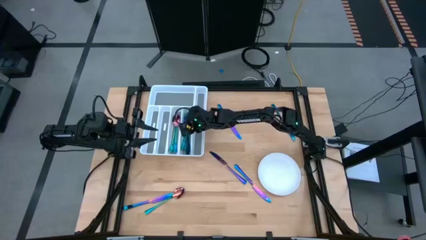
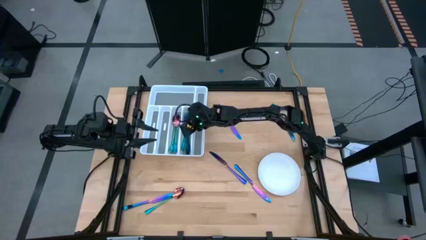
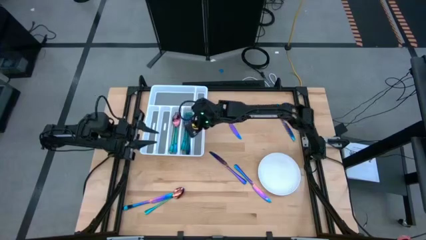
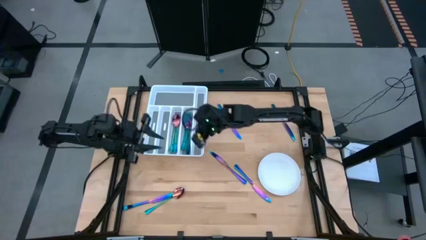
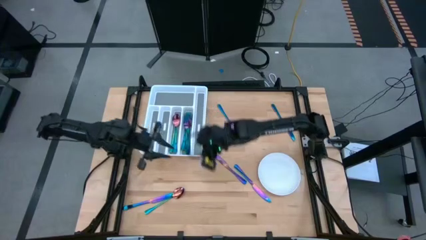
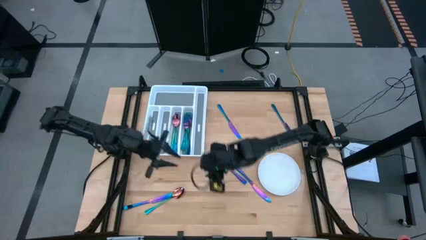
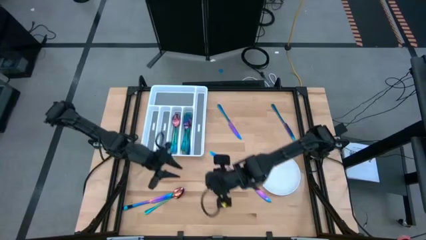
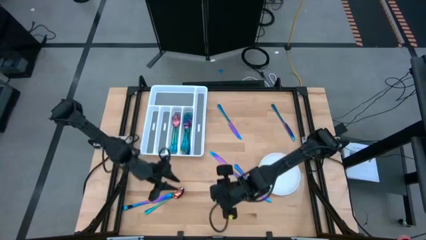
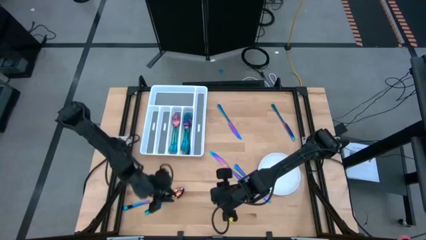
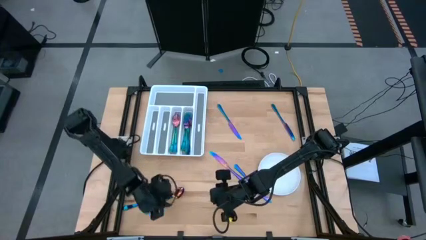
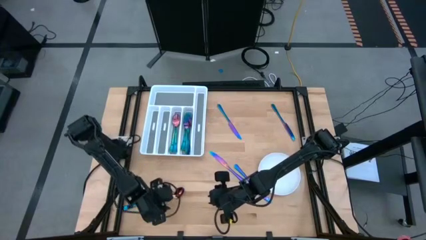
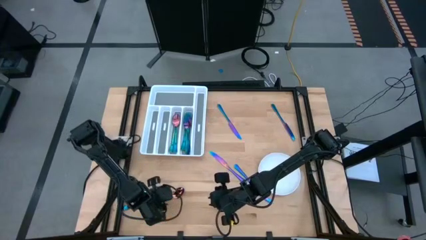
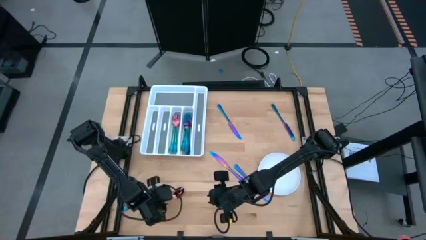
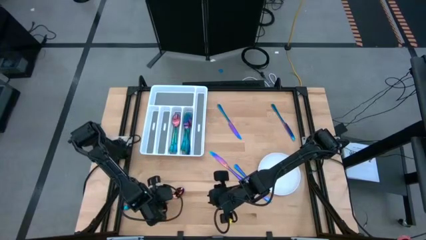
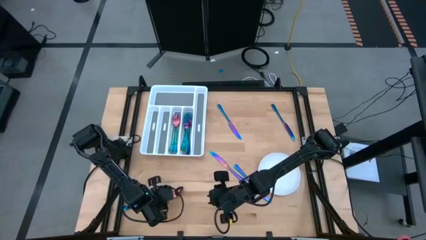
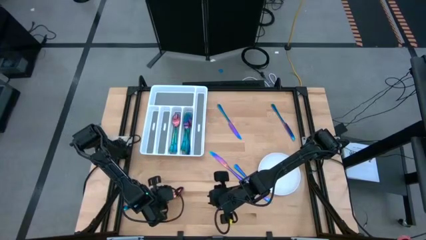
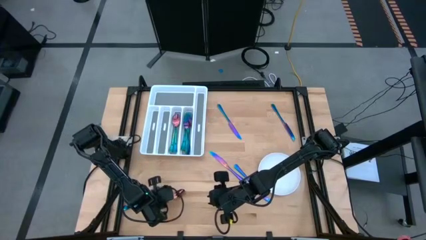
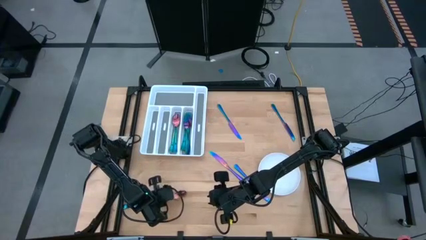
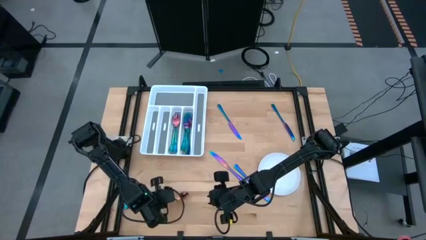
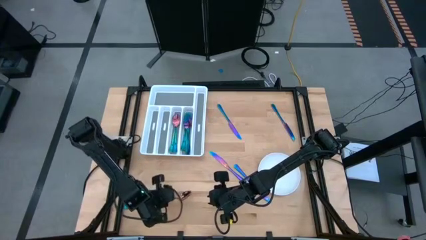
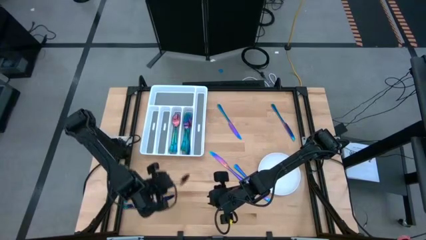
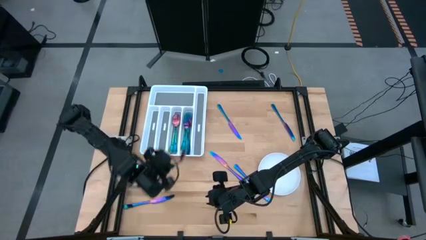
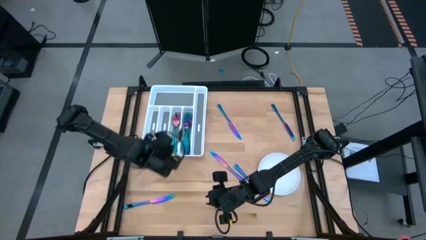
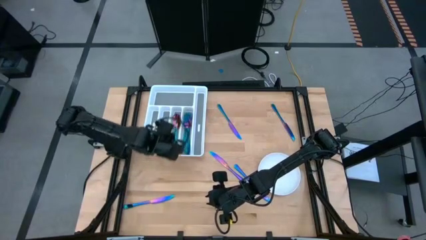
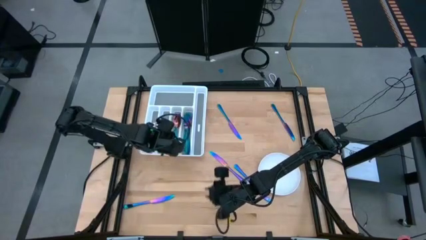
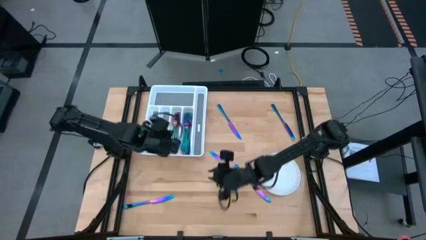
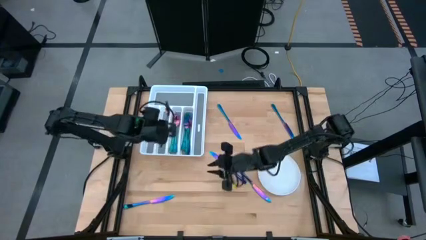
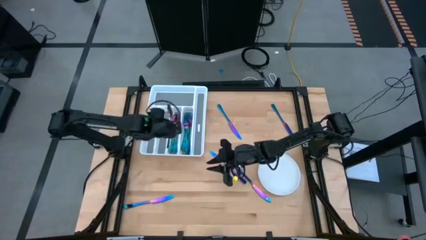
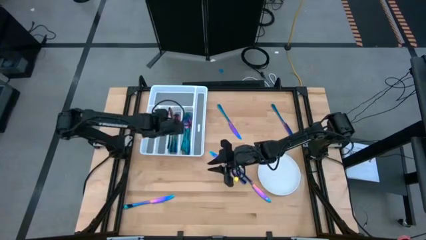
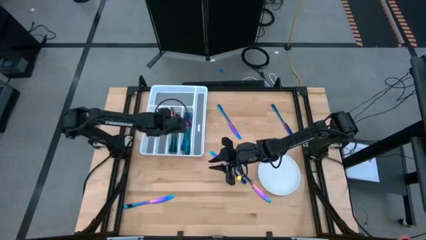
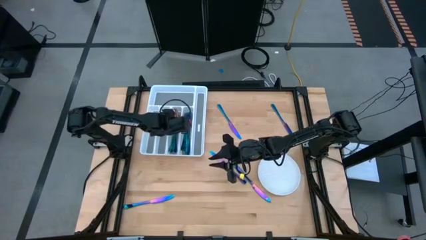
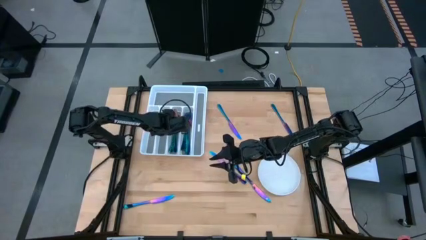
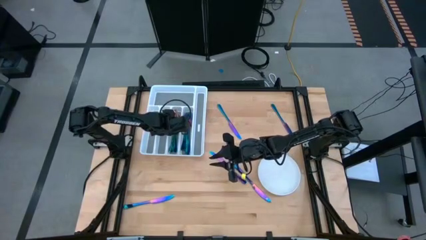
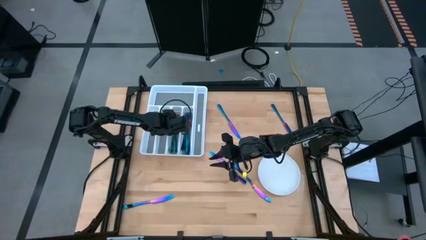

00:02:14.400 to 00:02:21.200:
Task: Sort silverware
Put the iridescent spoon into the white silverware tray

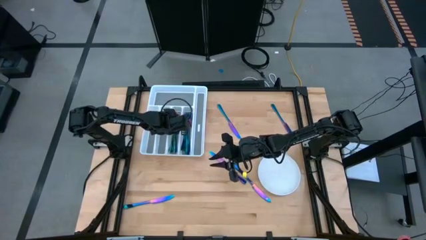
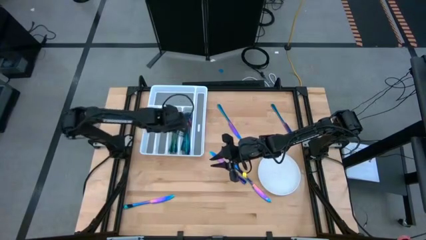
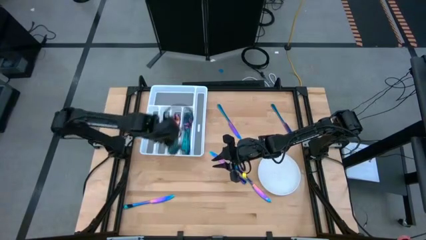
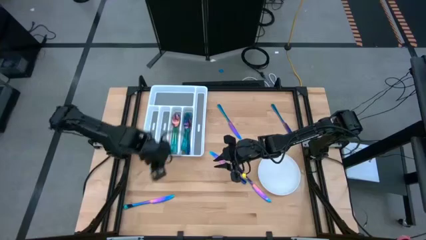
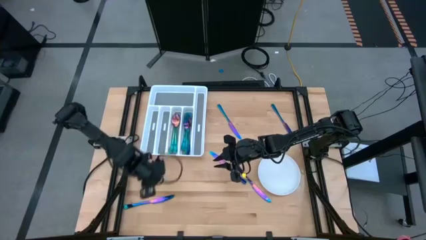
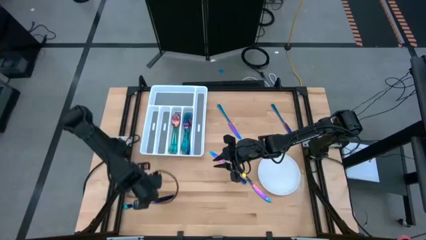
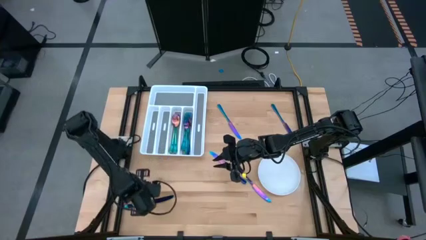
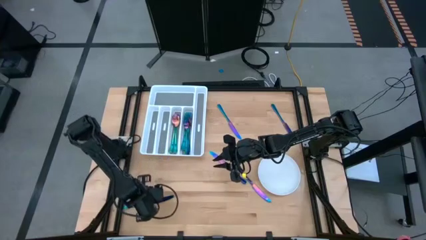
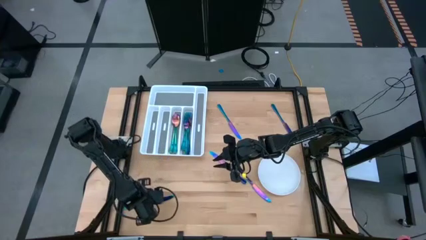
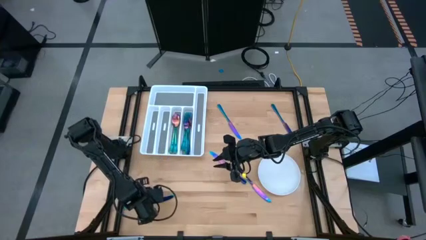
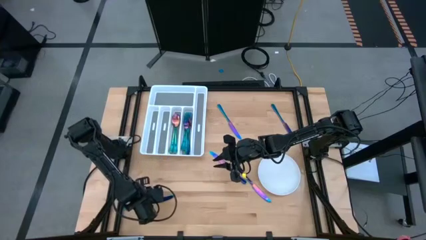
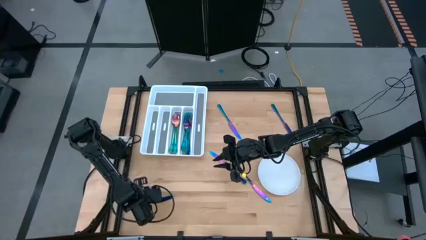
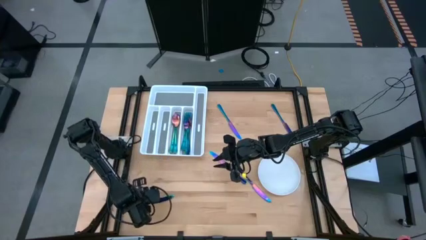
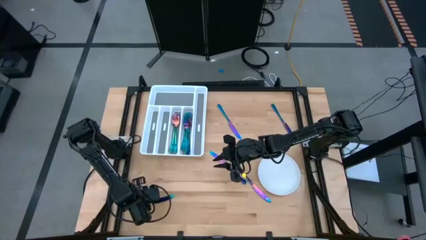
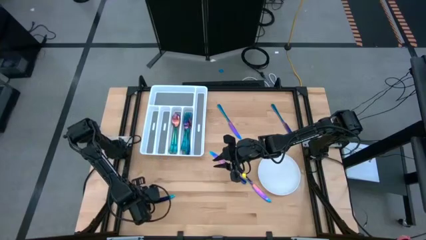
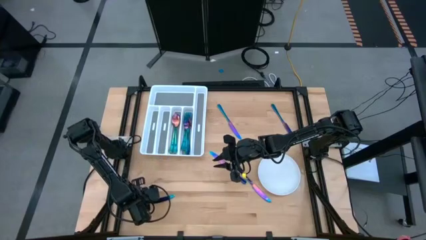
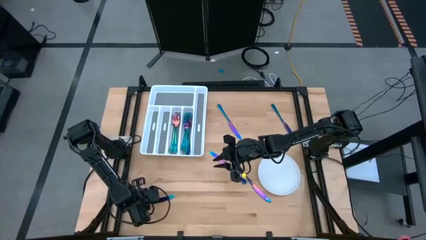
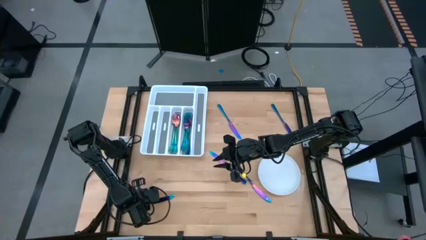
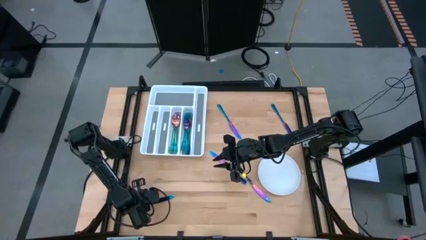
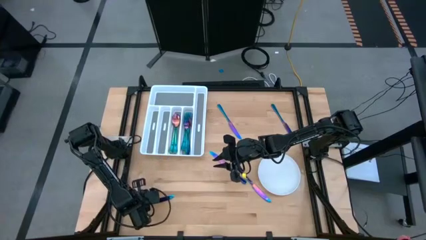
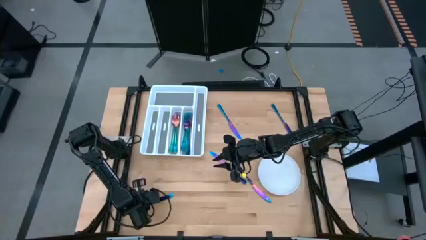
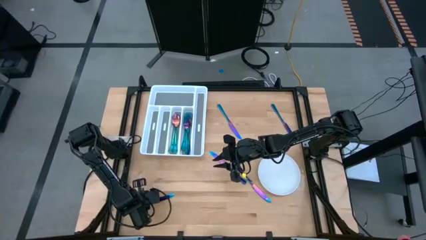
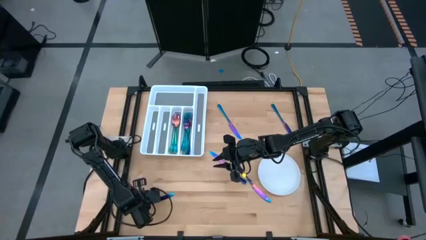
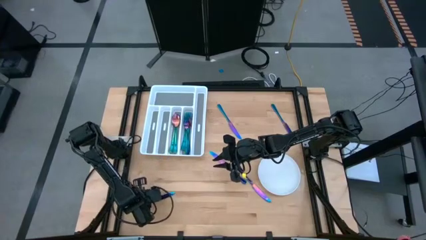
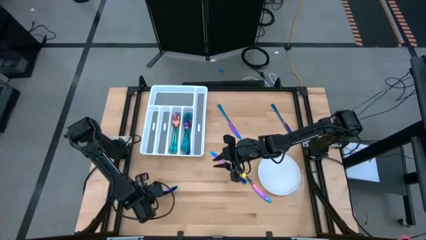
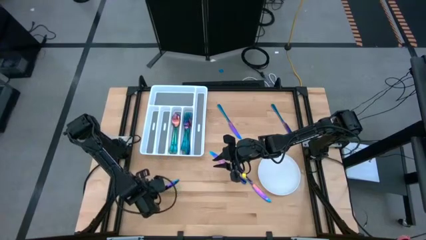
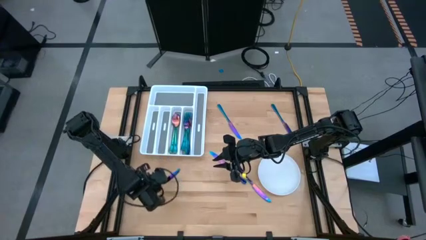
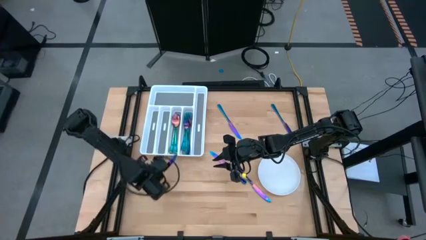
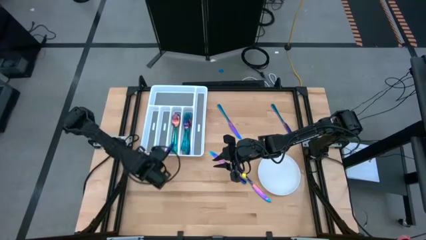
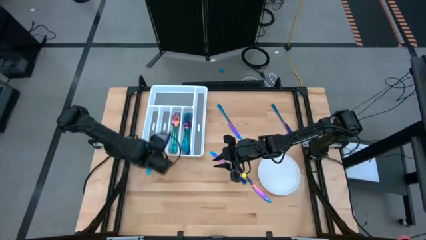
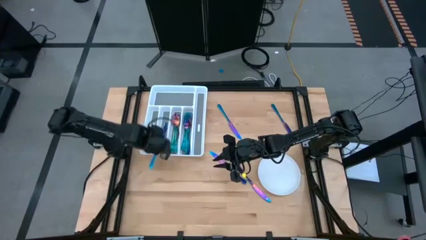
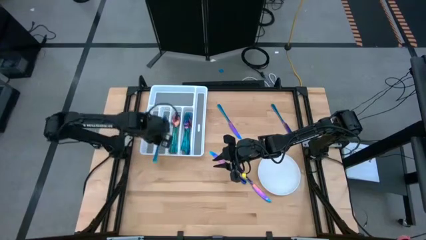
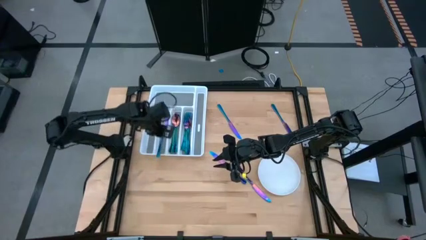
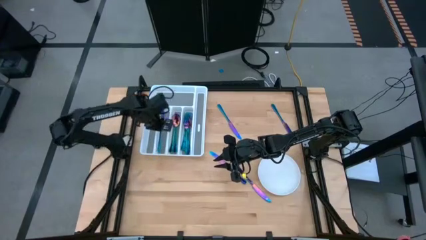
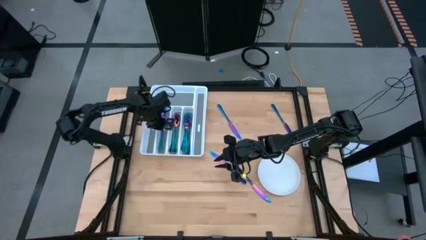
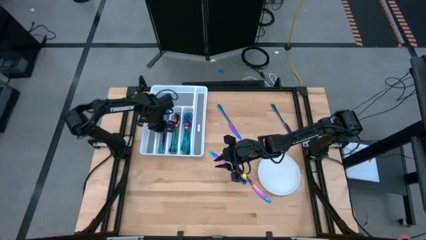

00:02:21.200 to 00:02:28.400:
Put the iridescent knife into the white silverware tray
